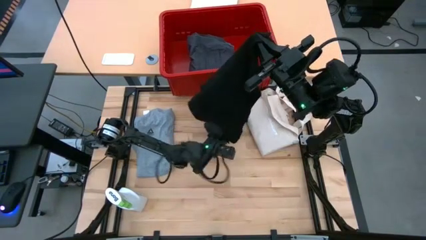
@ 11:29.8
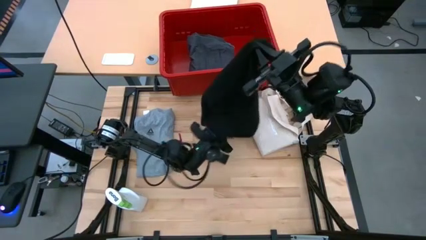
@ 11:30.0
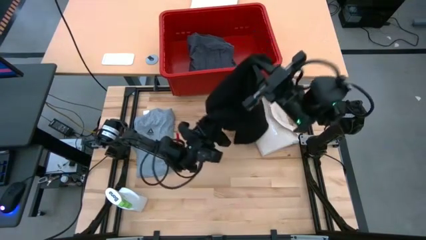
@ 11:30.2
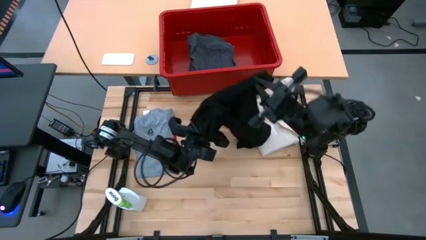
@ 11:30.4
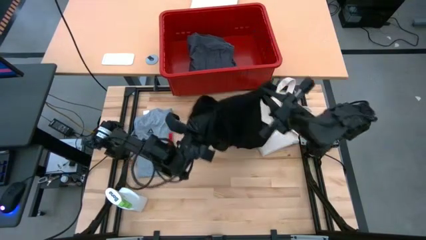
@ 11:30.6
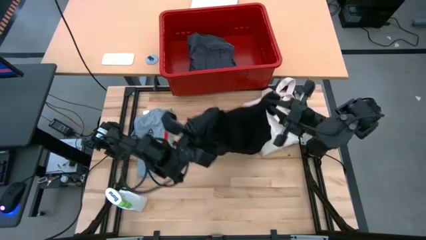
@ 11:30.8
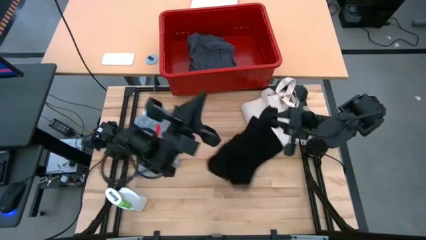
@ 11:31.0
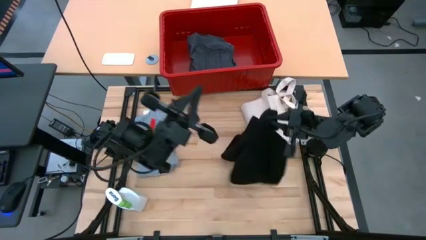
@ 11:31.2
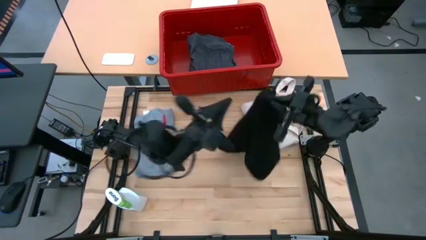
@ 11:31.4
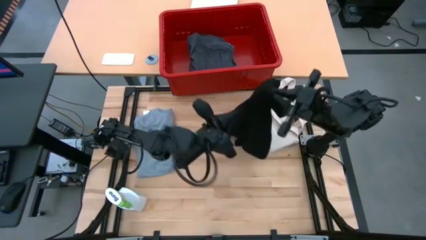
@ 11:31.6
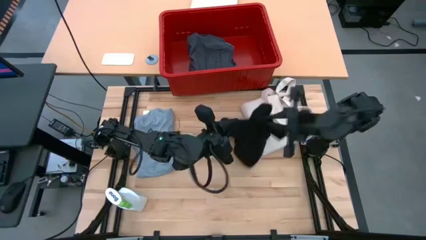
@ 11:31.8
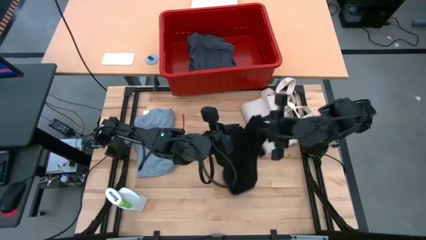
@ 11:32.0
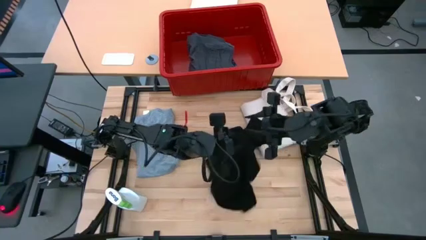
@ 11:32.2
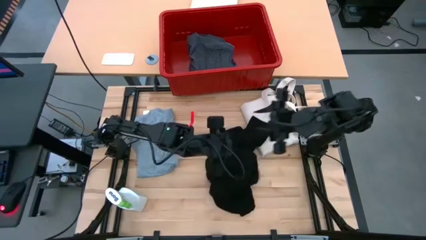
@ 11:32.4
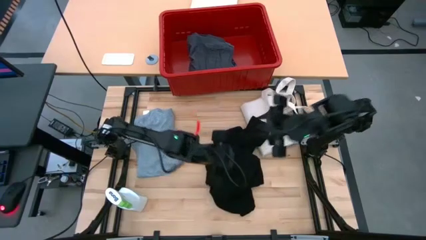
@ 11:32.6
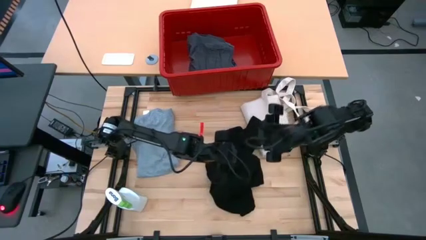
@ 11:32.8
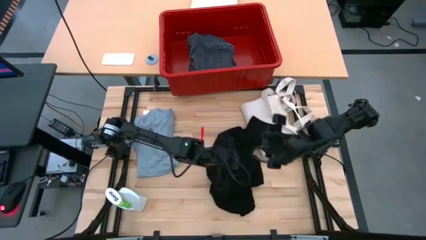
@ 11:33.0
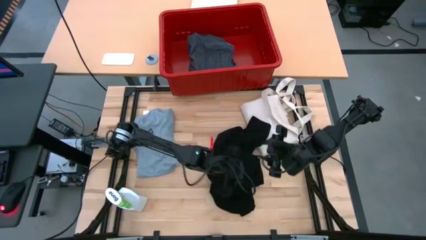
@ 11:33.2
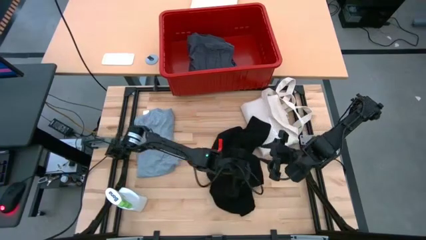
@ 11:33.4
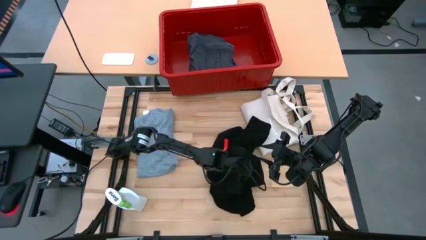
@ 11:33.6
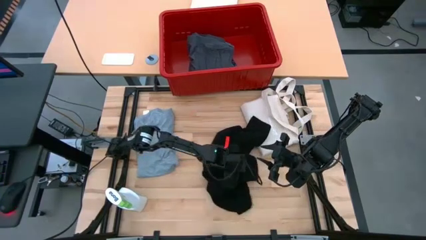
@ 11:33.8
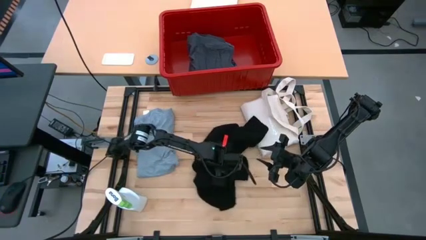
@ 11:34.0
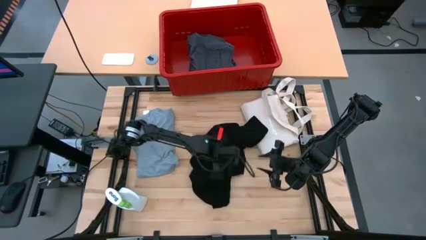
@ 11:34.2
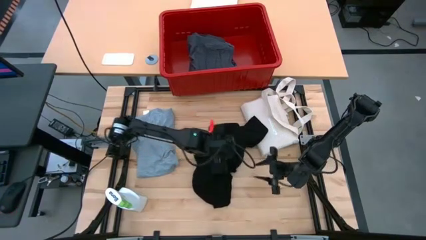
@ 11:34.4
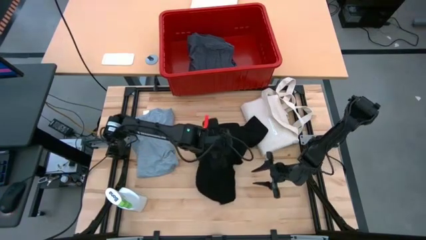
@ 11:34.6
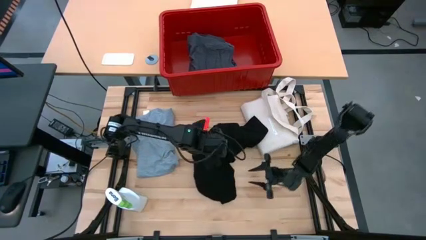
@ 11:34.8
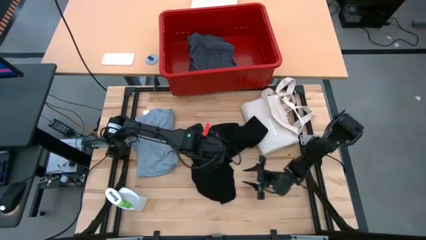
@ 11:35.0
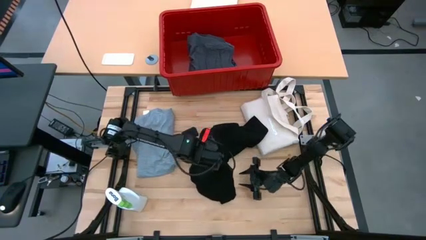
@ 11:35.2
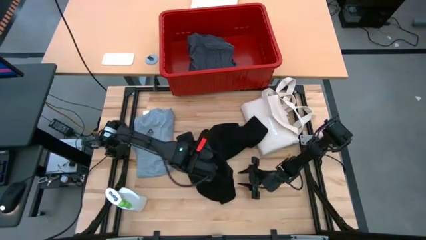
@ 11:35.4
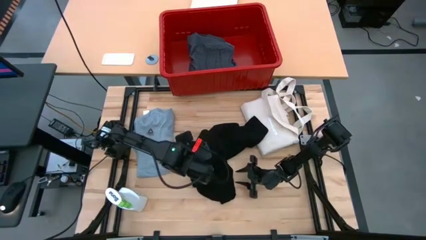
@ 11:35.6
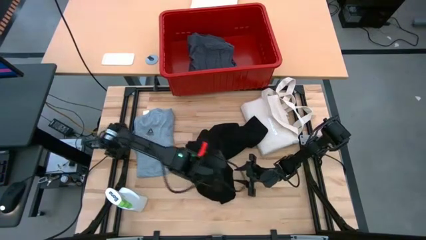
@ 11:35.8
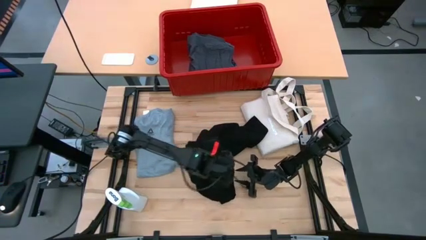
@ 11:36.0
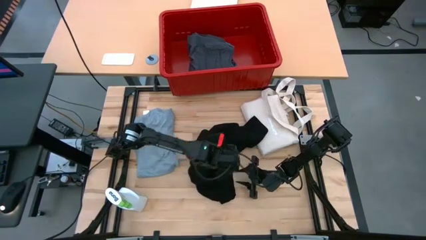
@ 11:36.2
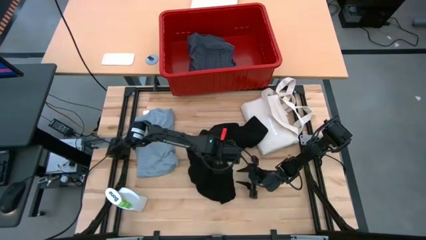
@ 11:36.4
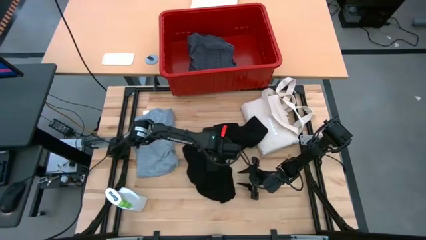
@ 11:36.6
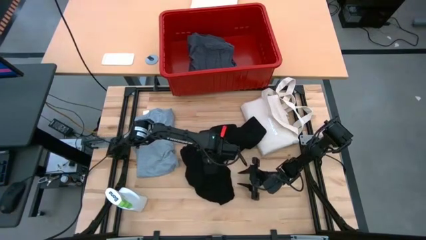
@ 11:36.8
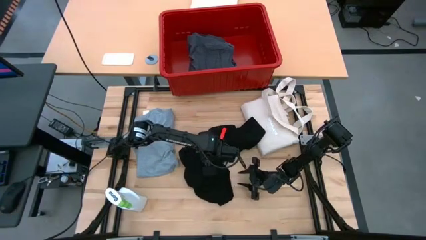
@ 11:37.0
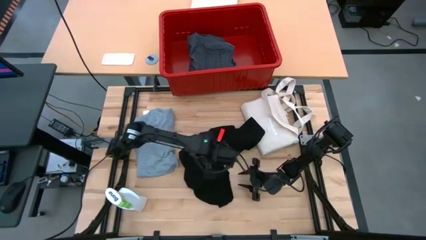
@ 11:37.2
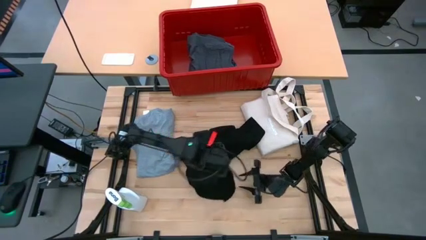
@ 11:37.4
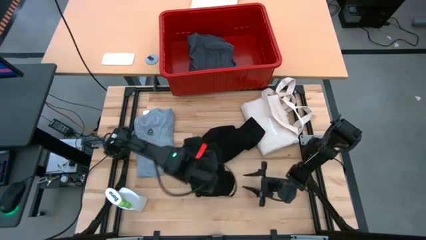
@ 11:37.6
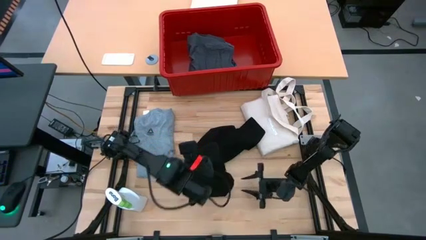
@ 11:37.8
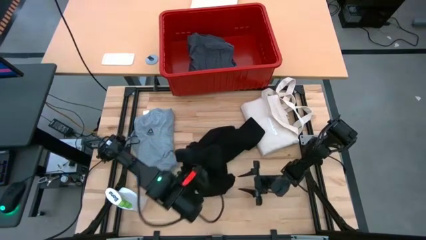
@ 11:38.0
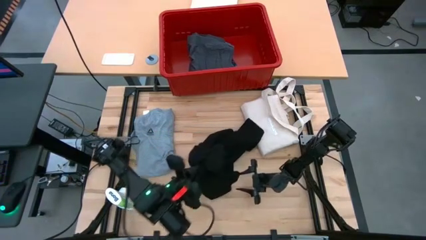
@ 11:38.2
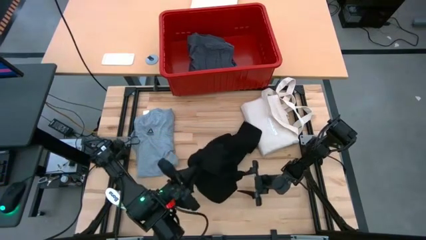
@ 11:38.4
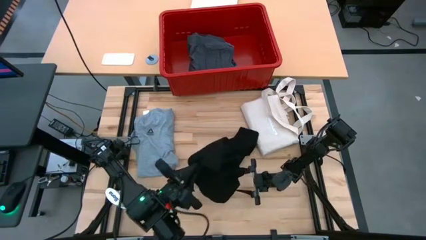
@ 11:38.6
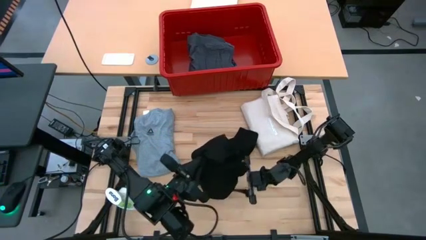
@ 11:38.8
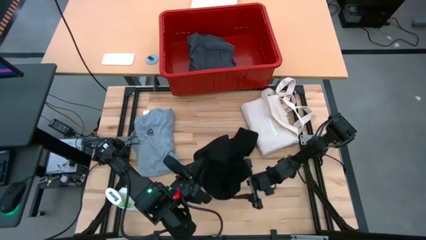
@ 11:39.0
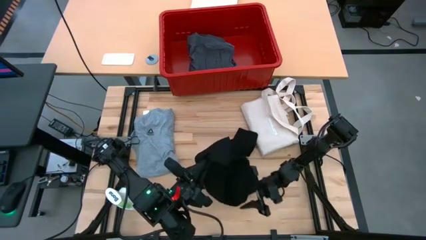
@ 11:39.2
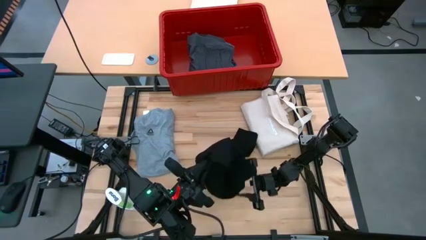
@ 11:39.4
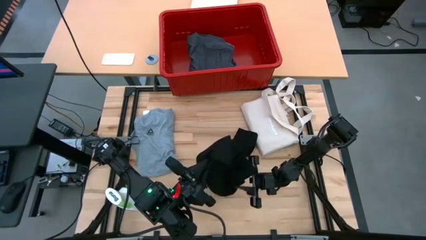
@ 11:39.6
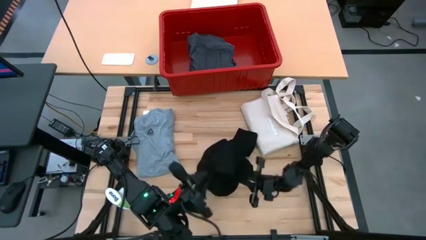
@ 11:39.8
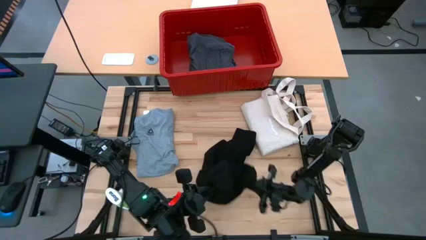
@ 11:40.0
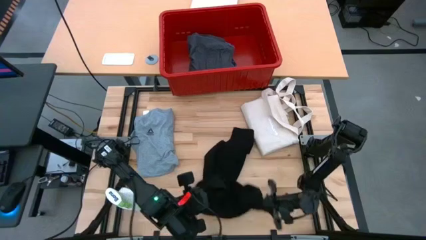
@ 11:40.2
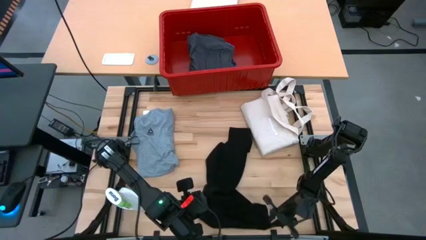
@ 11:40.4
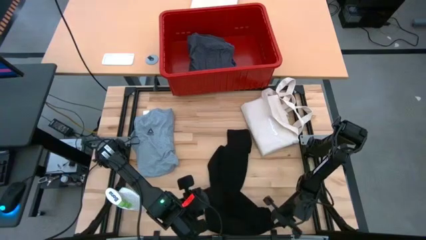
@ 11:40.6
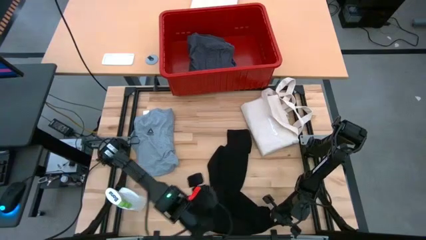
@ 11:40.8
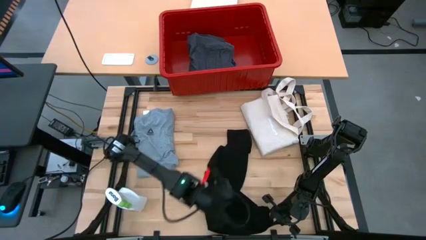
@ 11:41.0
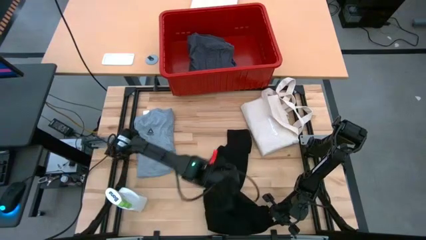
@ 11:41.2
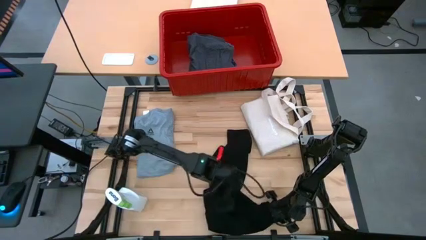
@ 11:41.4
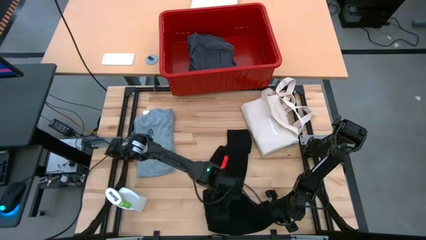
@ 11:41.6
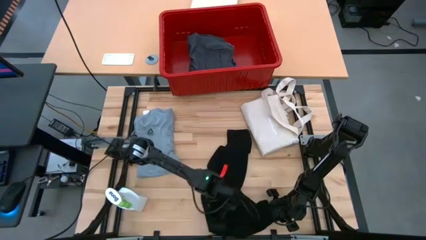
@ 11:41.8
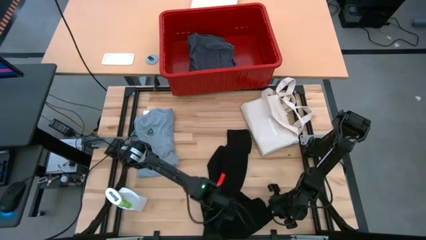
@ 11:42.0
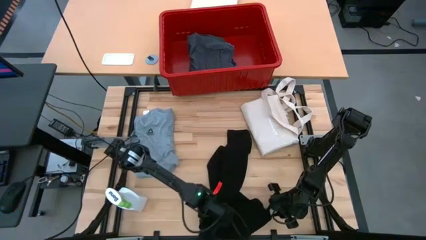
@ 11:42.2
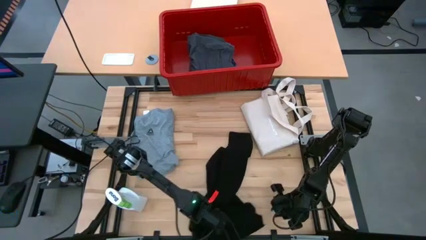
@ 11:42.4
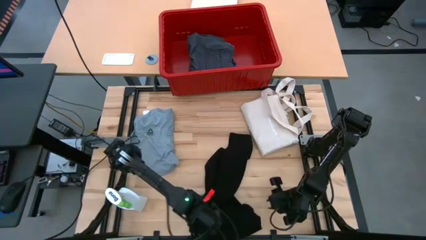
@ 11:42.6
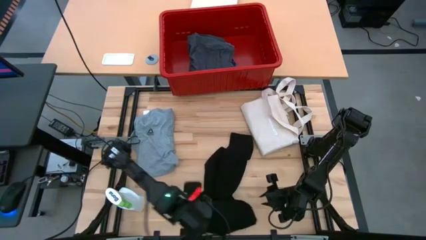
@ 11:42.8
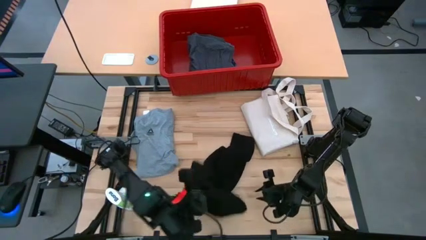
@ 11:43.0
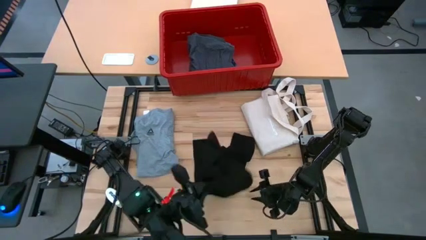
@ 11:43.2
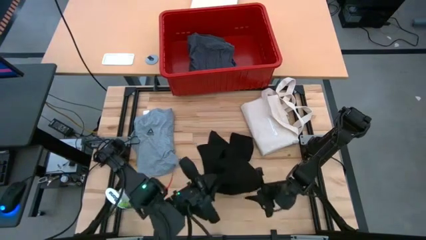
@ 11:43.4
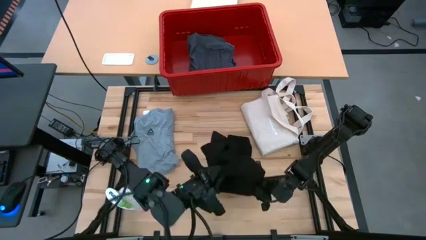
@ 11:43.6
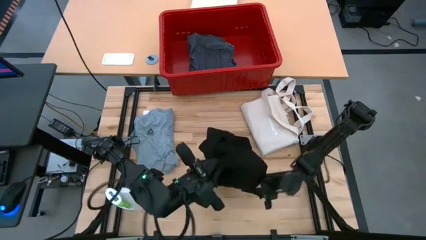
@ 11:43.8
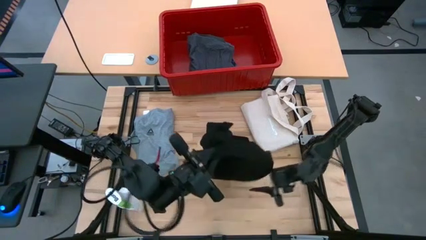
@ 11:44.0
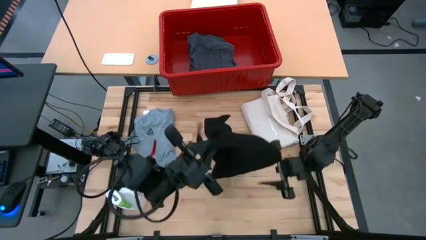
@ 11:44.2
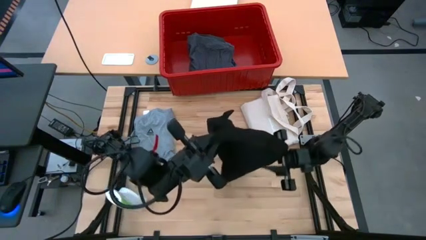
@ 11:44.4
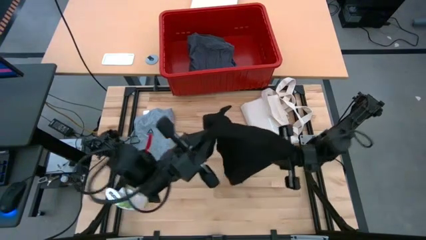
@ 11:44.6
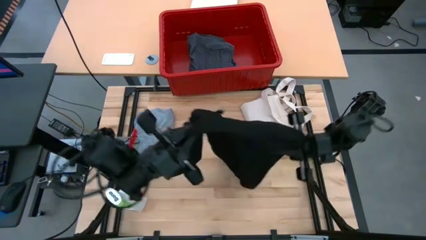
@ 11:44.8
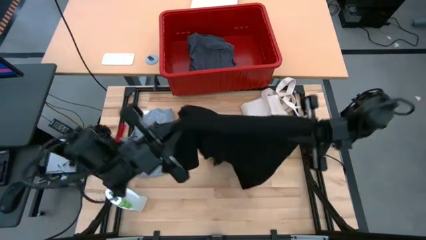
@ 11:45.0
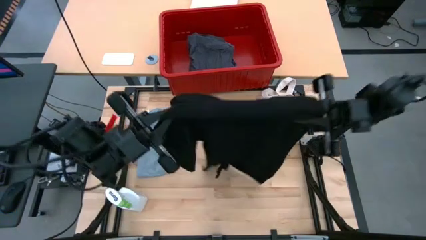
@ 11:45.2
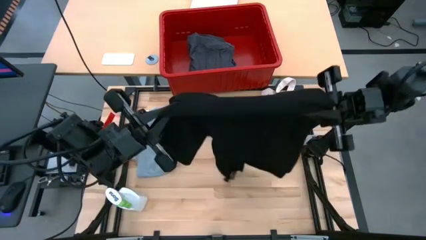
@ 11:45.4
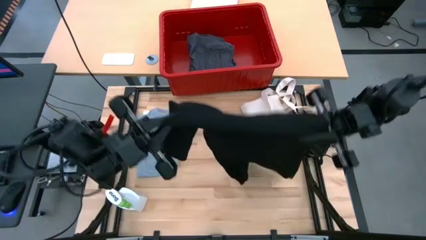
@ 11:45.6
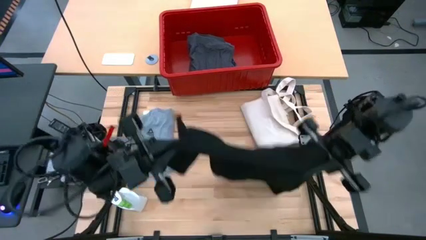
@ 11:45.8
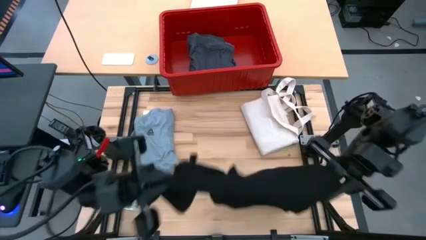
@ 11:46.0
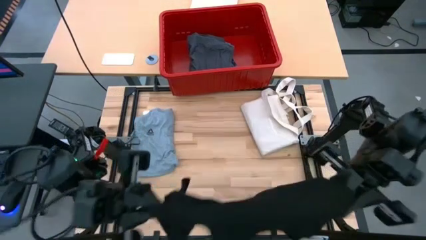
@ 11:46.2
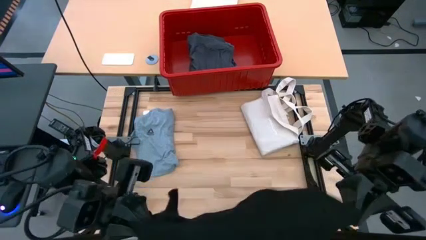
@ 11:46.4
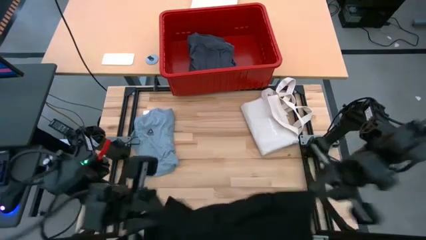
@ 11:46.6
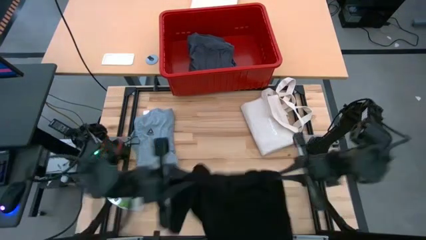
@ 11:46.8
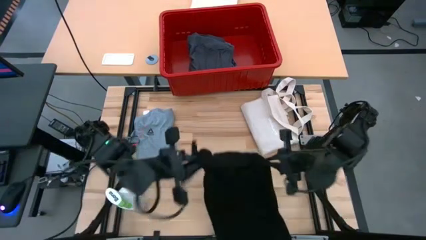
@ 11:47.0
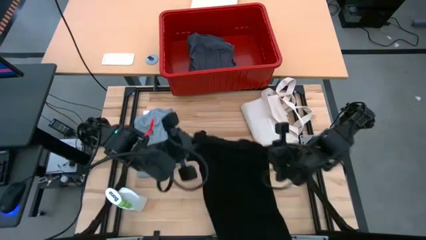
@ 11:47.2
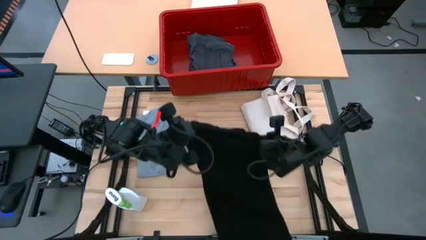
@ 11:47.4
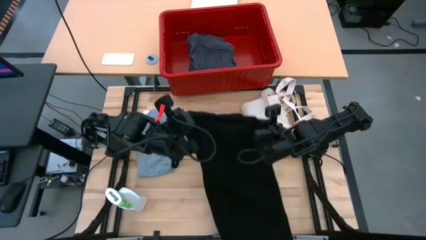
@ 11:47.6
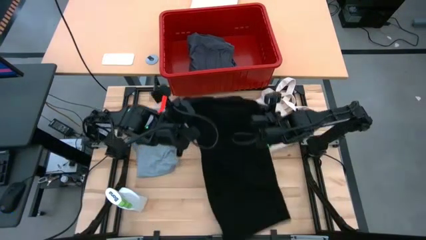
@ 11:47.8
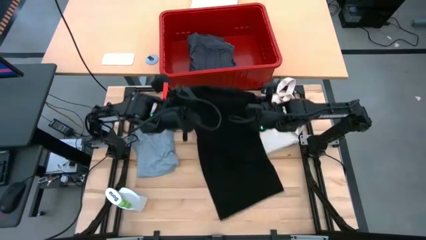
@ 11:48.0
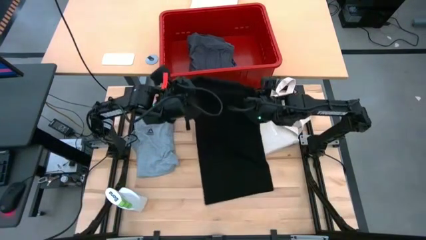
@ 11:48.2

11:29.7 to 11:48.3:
Task: Fold Laundry from Bin
Fold the black shirt
